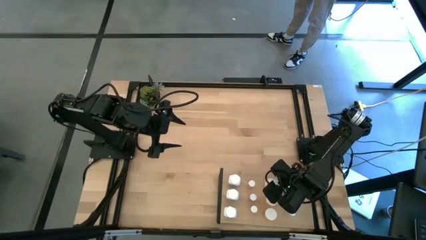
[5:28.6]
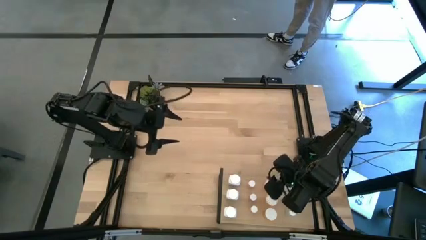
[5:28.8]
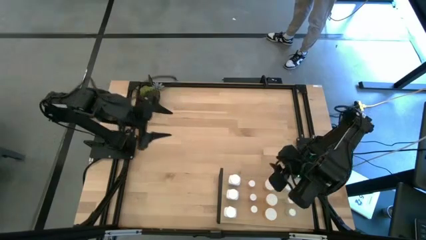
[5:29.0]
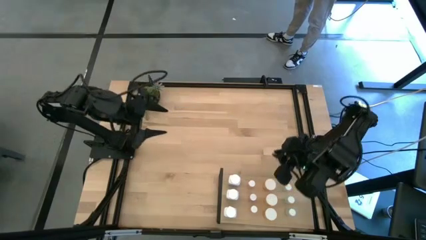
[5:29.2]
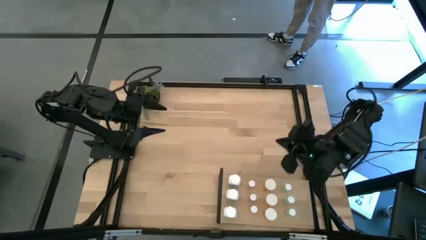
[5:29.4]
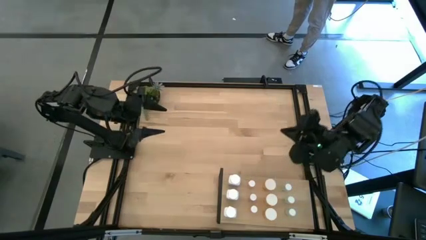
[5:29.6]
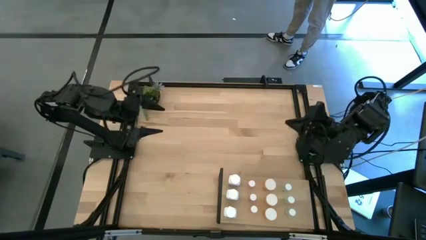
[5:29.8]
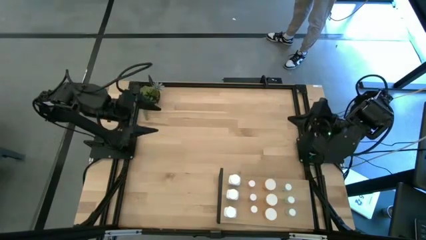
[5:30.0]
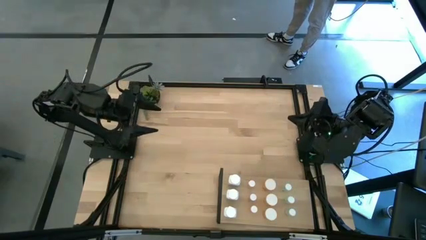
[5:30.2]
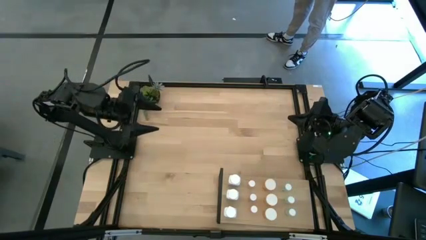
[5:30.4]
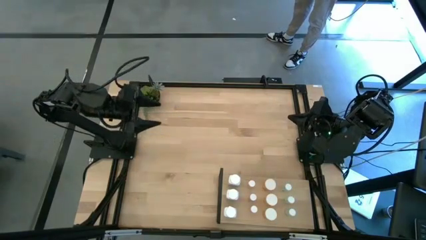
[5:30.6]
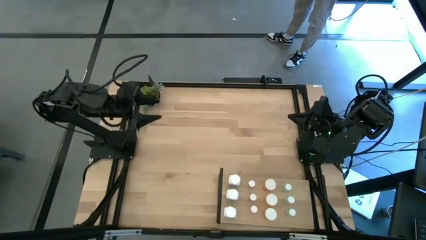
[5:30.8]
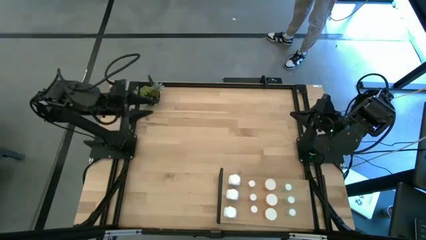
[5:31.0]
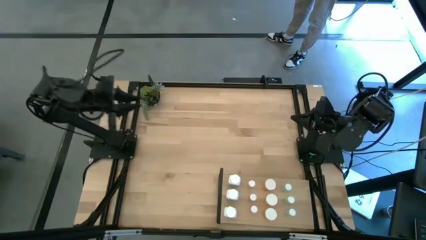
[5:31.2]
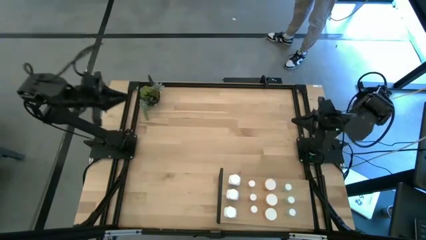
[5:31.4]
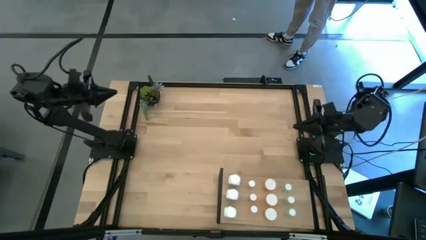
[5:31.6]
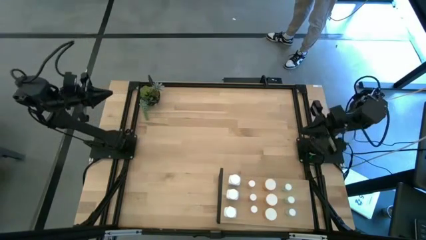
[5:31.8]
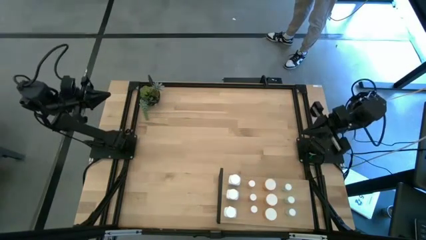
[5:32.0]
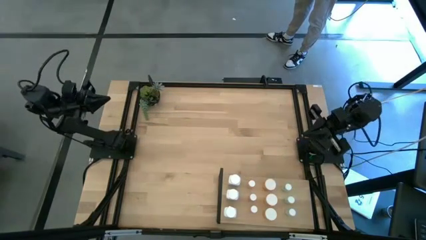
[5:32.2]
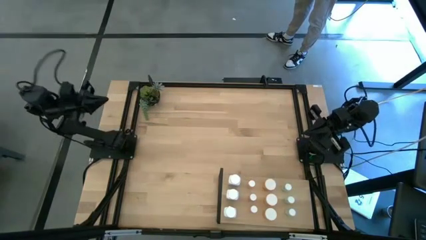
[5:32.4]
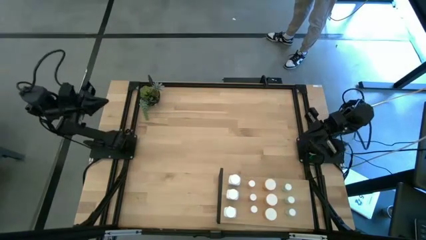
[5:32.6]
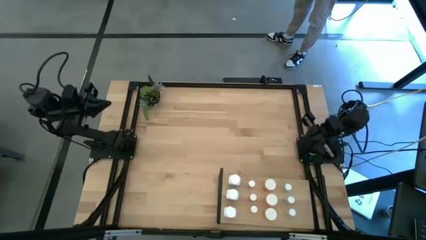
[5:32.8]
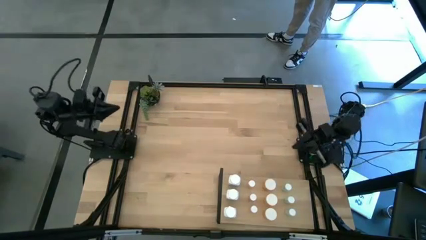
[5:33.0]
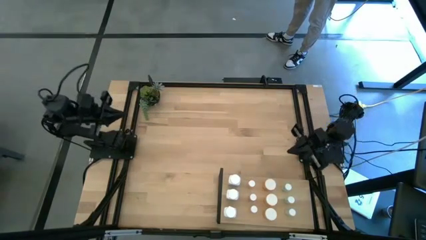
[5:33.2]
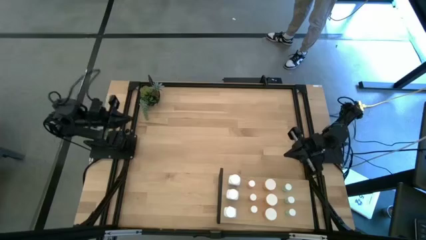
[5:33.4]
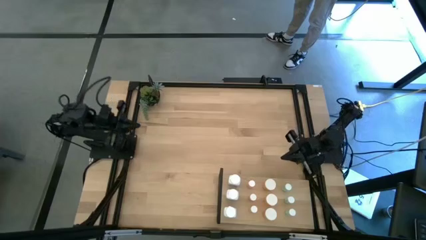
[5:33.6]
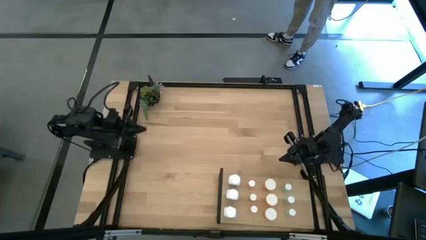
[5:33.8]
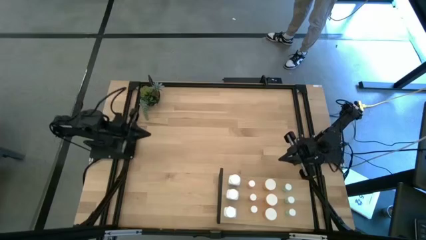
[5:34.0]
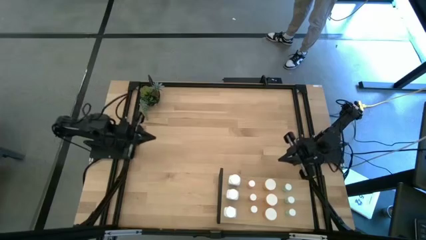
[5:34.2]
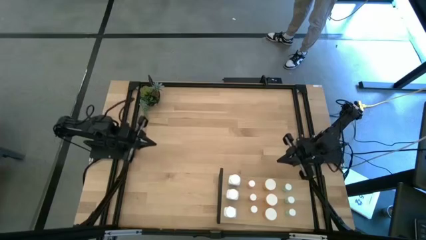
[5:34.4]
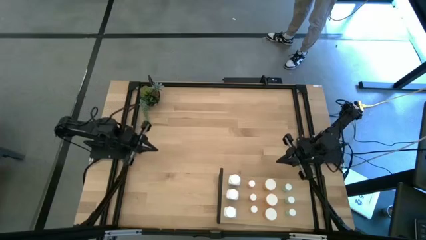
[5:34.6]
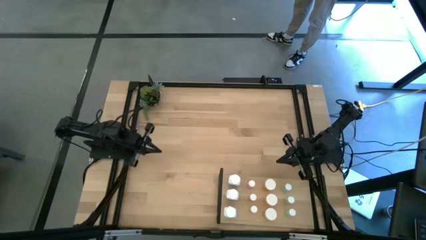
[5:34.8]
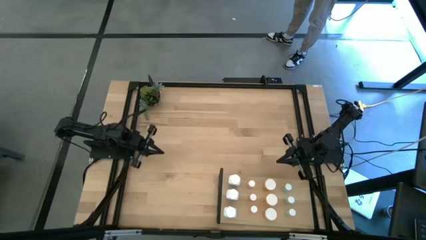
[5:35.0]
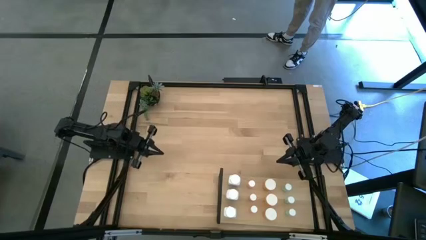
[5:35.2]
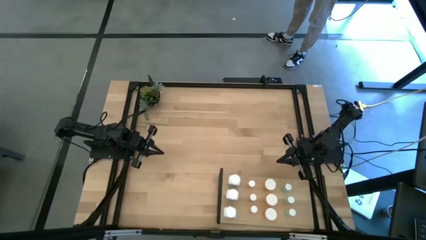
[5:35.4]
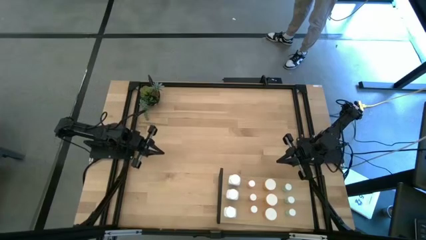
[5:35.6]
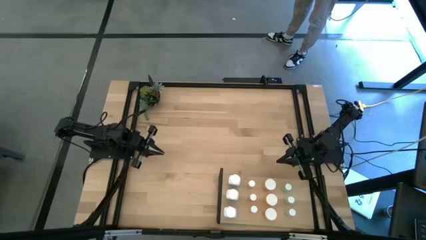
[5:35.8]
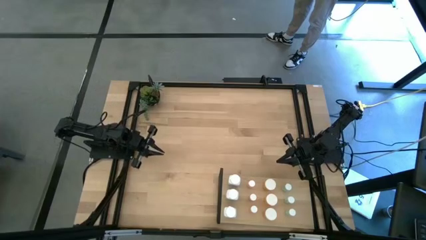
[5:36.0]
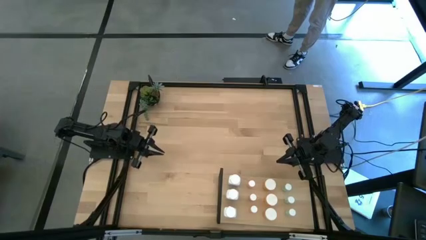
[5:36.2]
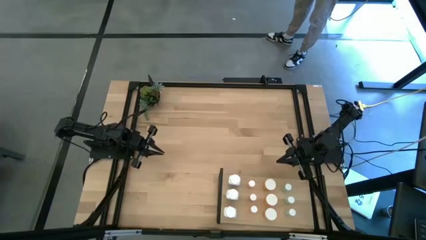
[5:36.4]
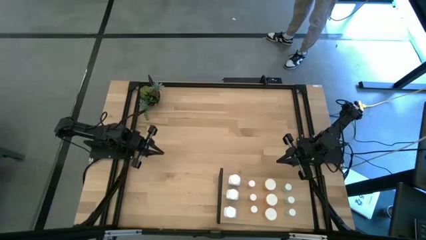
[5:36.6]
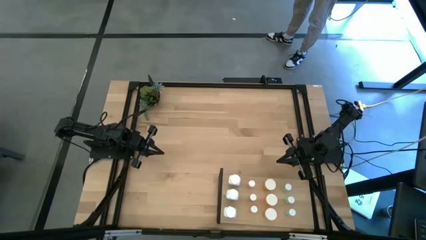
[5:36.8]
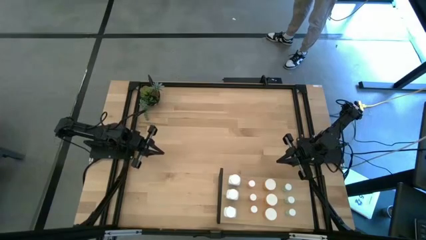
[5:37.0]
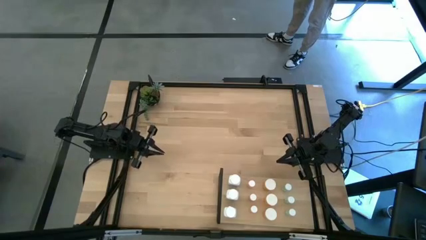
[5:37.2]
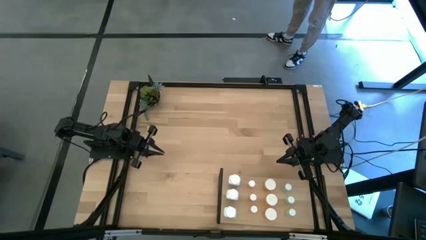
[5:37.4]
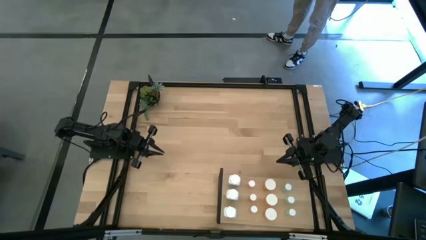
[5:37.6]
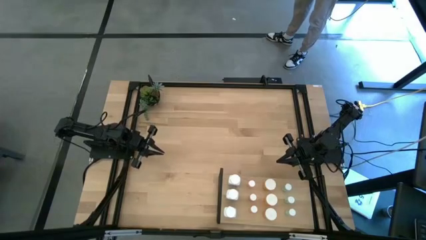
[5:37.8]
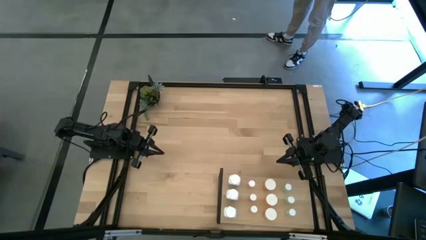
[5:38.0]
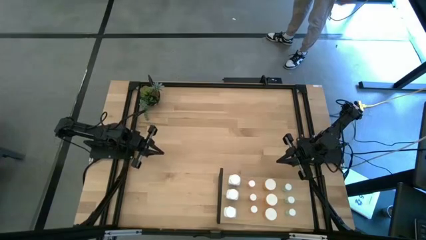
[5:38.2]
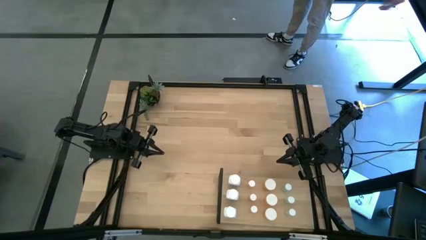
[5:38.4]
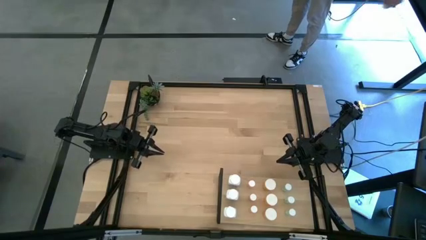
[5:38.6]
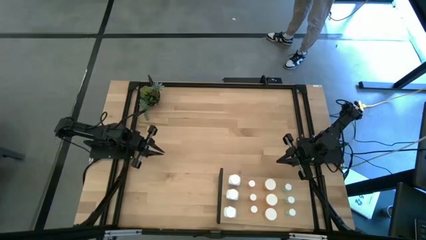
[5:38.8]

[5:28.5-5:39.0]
Task: Pick and place medicine bottles onto shelf by color
Return to Home Position
